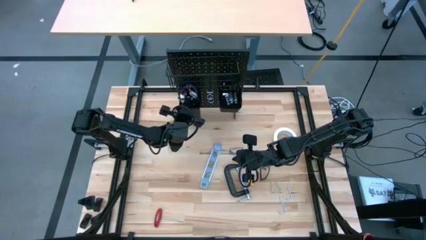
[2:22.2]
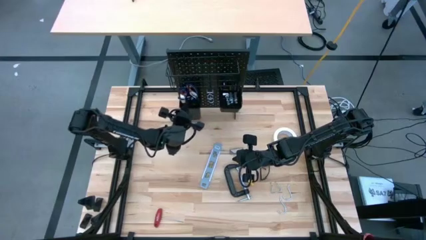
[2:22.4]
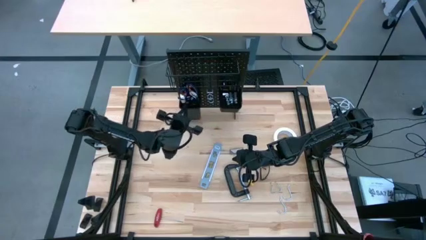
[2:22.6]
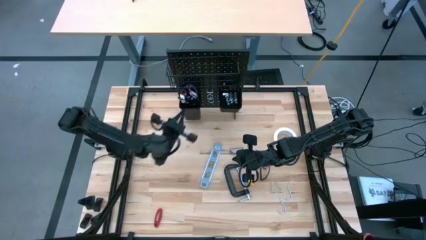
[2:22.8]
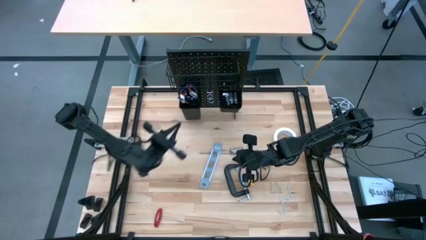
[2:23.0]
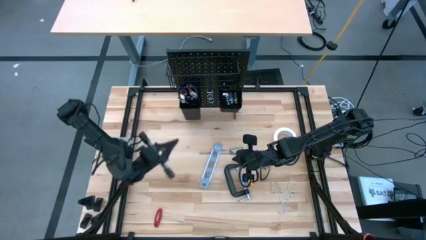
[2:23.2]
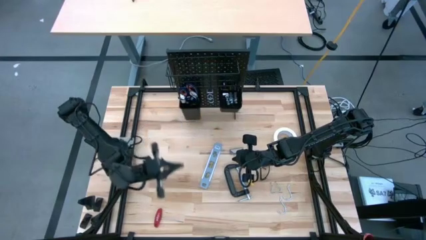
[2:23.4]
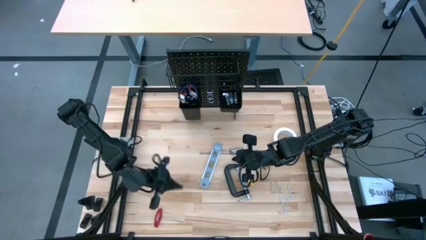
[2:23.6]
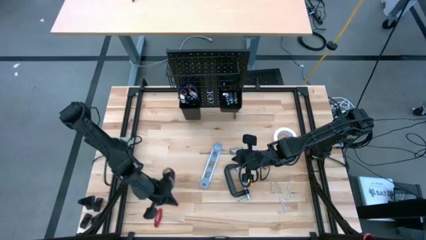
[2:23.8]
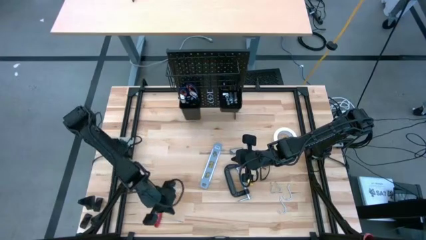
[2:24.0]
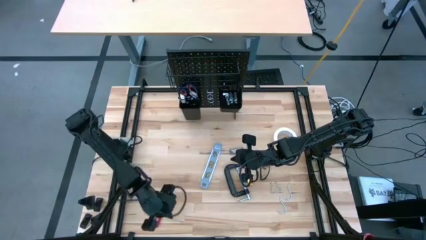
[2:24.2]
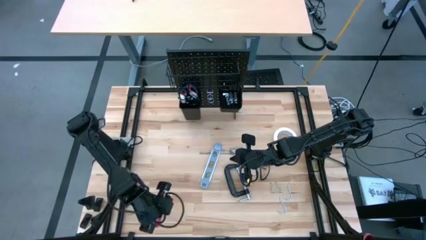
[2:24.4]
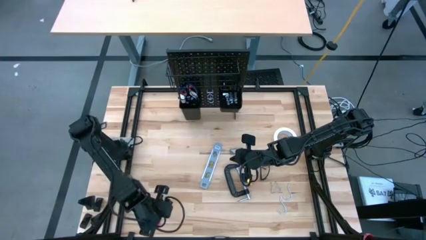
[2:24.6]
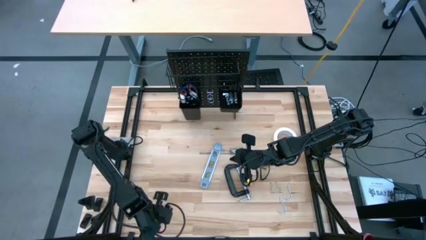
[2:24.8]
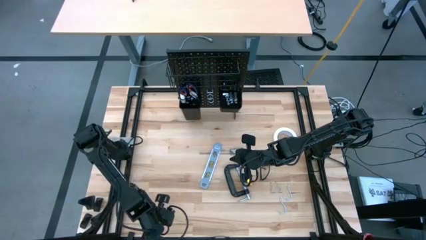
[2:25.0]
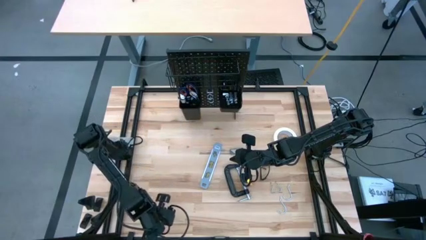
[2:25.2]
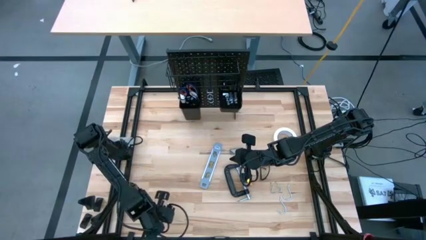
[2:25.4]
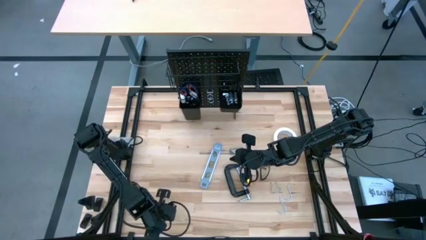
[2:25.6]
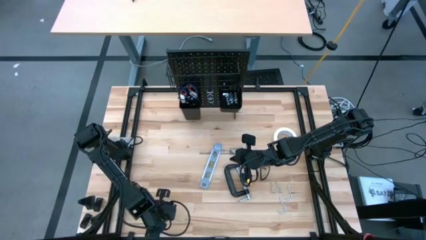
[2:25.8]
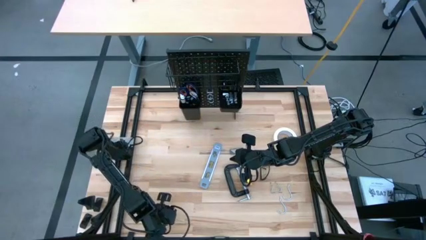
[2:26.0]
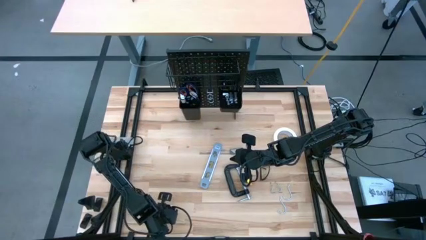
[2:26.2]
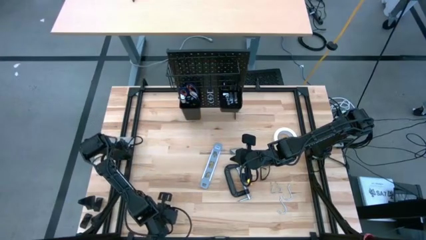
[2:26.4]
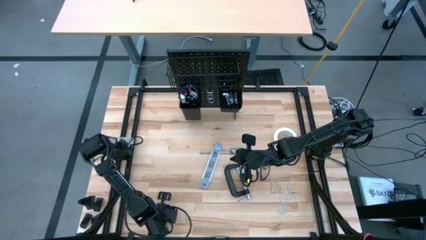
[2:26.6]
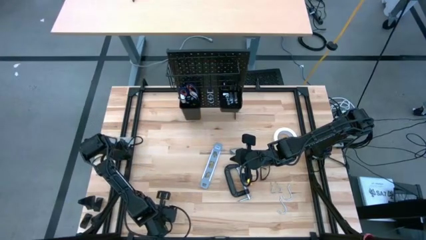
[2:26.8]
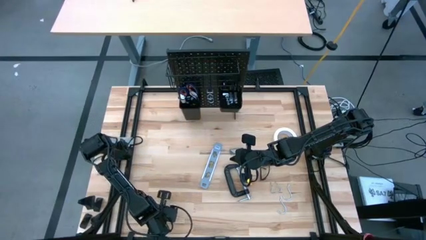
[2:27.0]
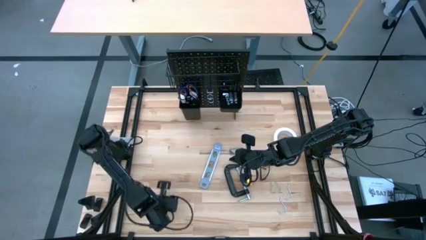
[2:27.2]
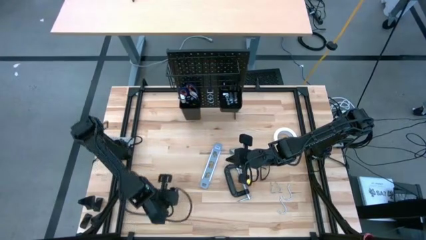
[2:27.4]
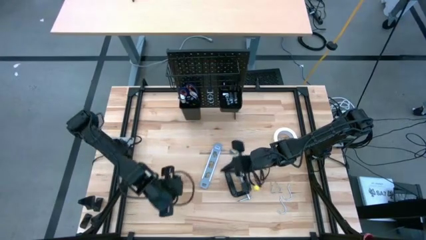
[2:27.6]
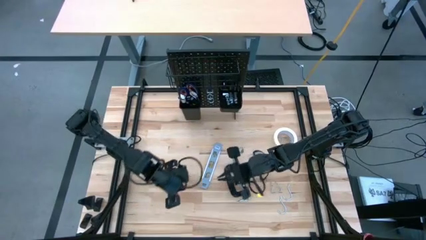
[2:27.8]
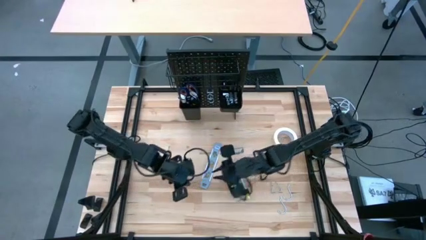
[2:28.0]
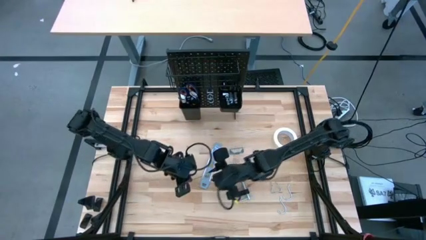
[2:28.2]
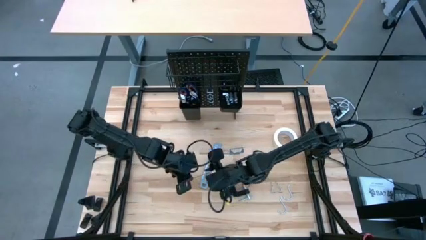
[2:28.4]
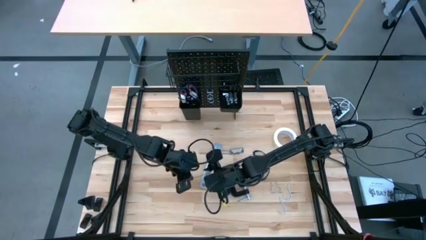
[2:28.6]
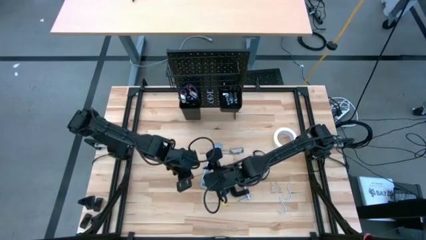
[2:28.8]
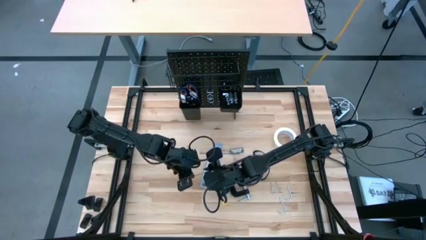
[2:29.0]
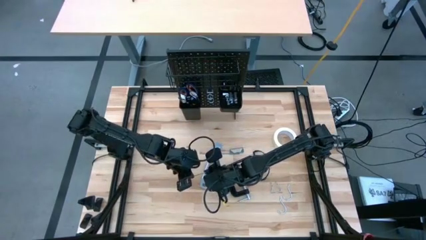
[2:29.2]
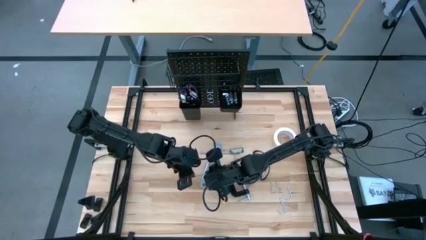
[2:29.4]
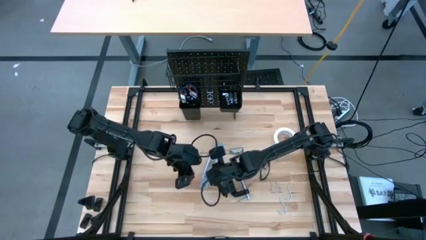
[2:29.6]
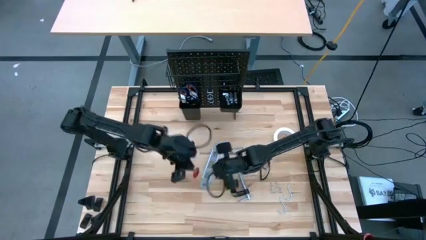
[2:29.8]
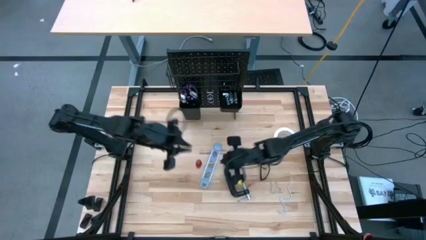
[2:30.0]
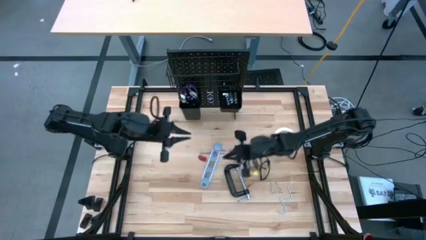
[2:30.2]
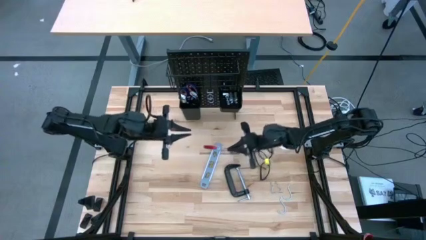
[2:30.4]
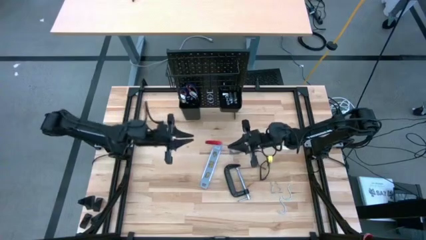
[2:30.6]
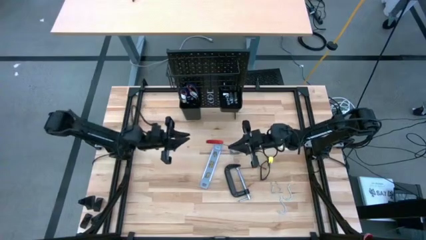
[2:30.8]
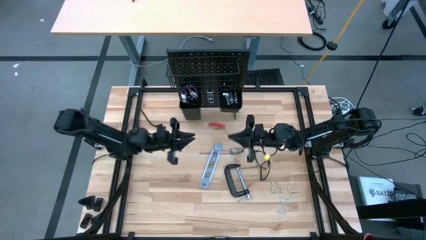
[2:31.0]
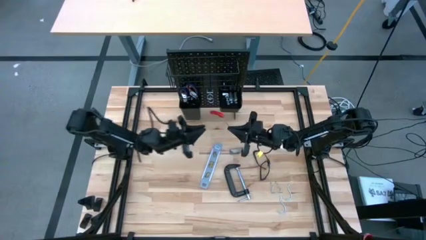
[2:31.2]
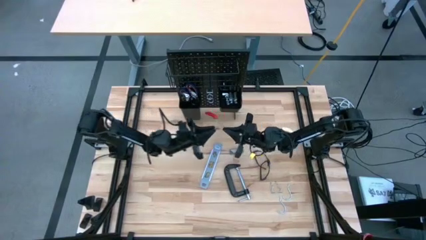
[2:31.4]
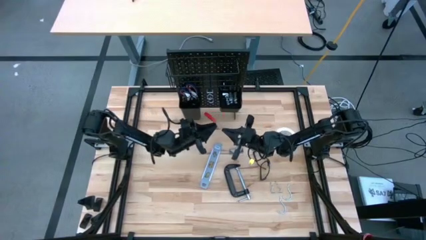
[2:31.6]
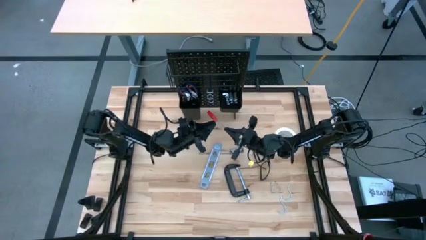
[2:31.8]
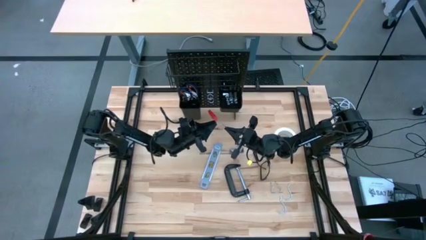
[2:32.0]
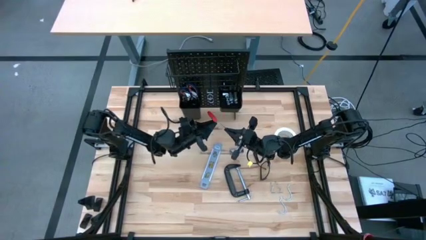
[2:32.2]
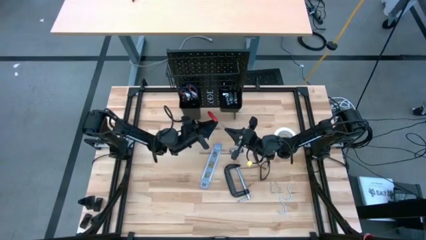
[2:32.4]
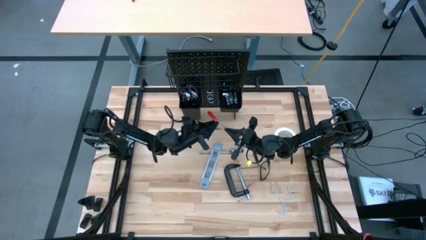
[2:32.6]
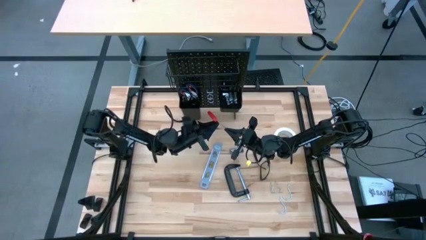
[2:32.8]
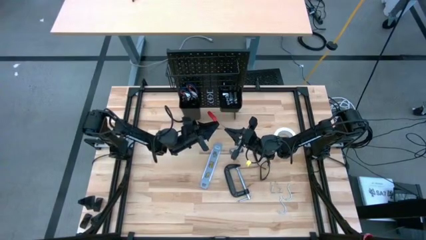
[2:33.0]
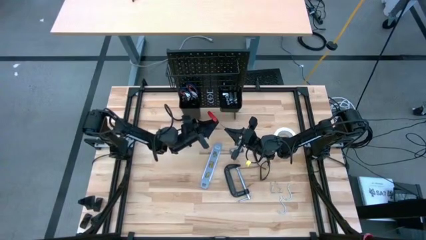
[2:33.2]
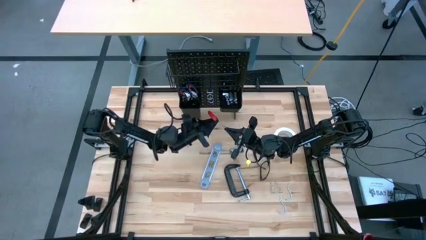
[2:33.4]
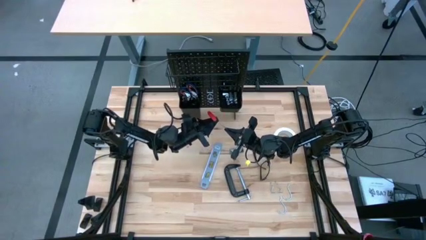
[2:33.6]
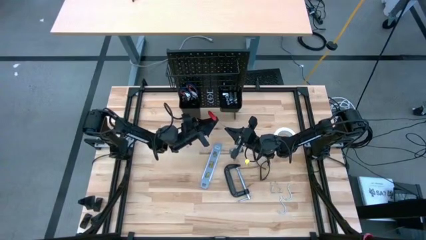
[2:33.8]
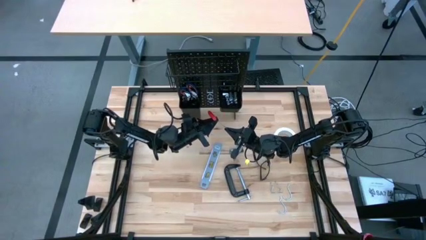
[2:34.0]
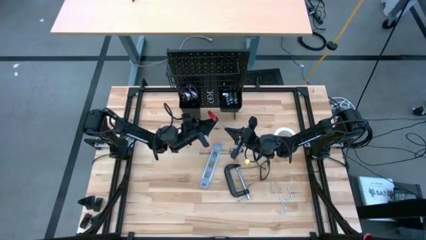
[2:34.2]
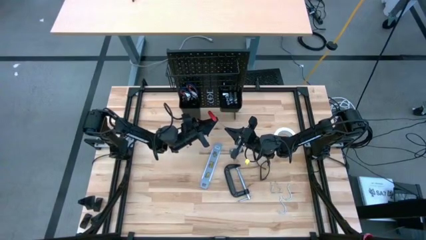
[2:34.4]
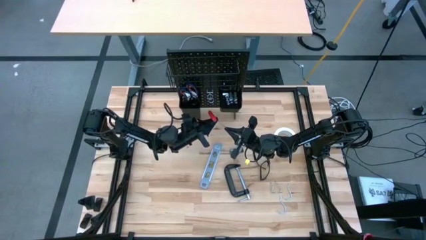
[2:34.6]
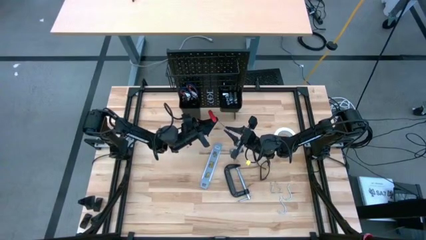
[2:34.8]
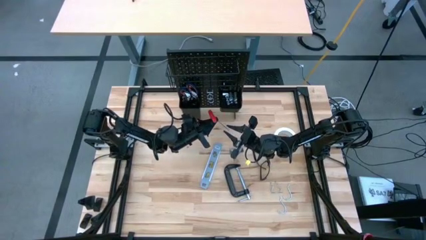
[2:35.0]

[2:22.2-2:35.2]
Task: Hang tools onto peg board
Hang the red allen wrench on the peg board
